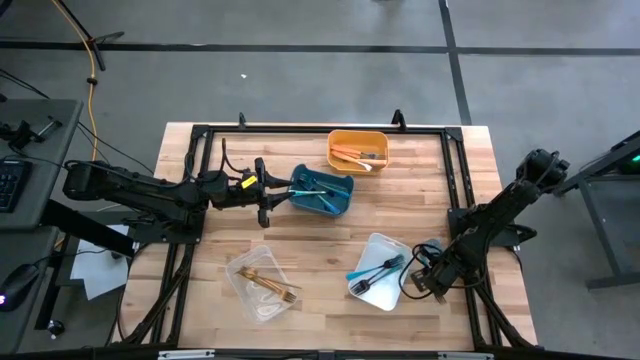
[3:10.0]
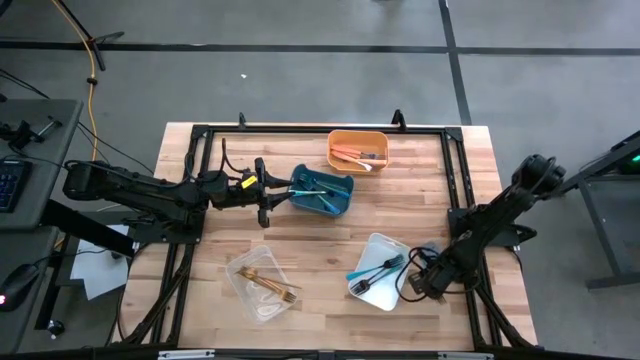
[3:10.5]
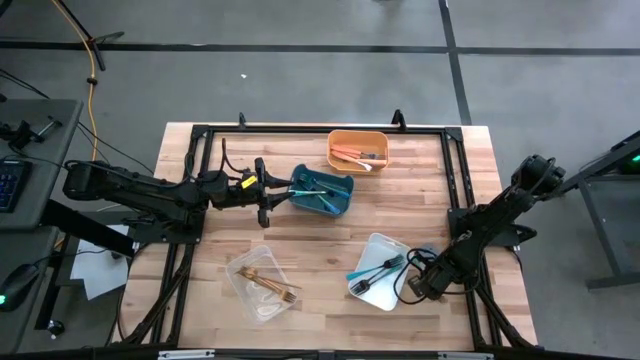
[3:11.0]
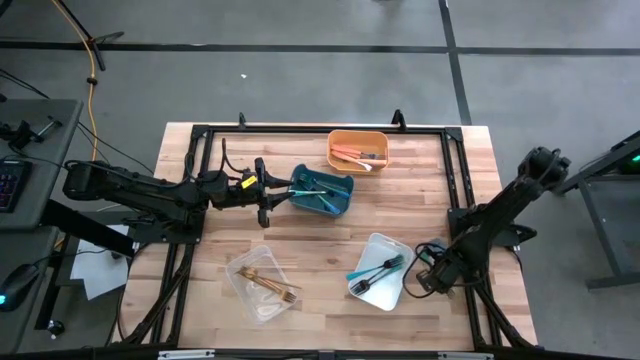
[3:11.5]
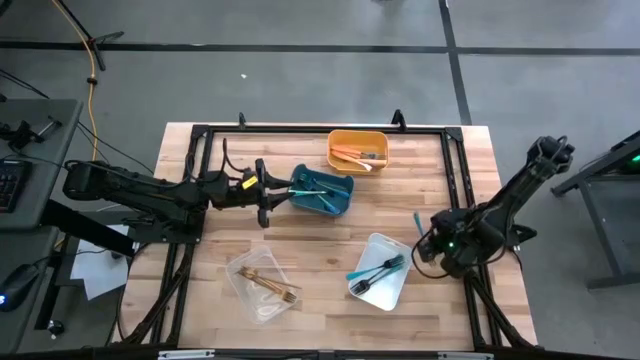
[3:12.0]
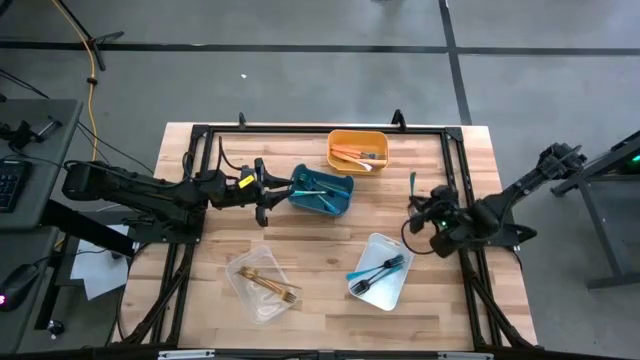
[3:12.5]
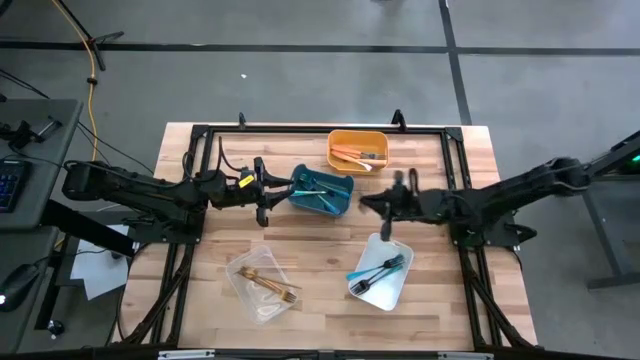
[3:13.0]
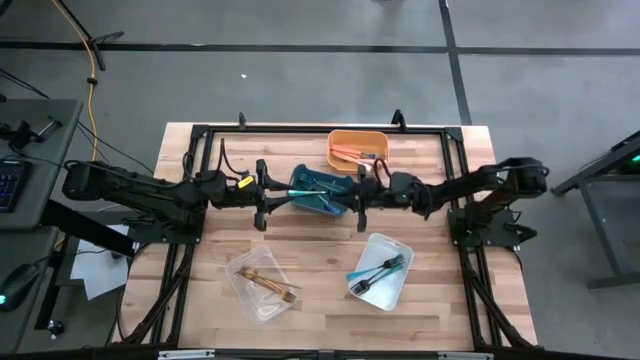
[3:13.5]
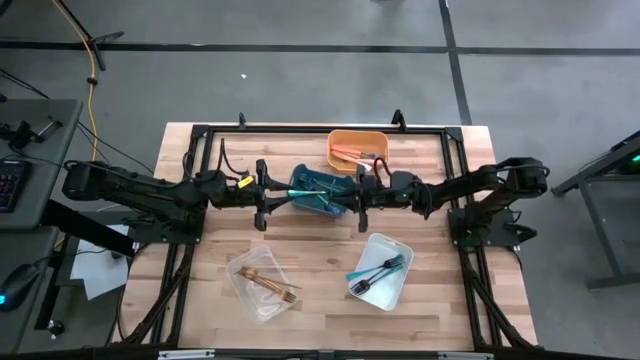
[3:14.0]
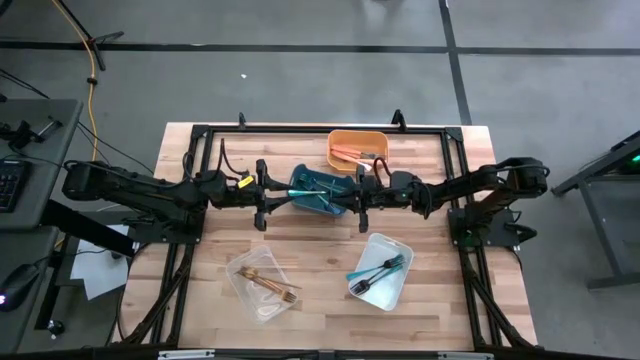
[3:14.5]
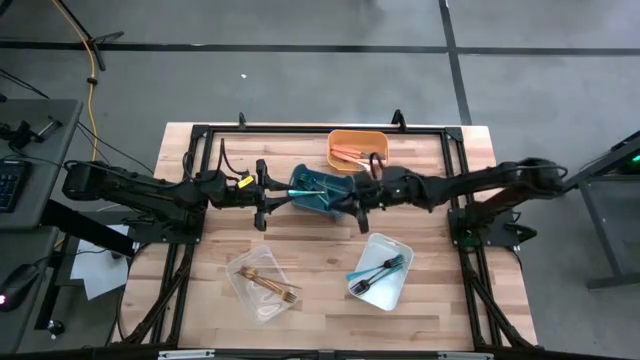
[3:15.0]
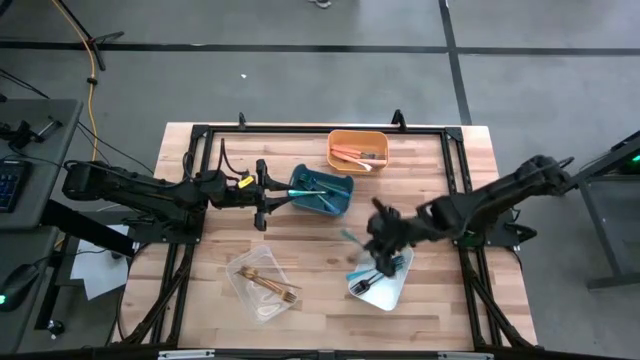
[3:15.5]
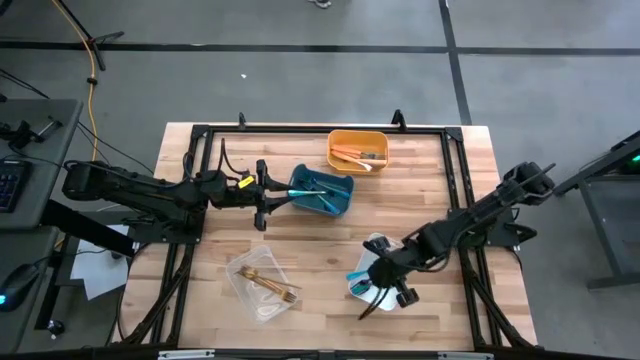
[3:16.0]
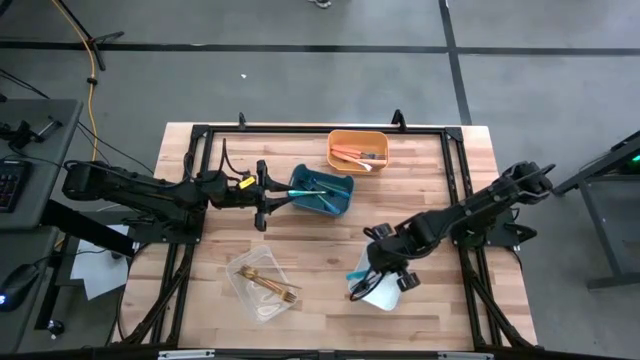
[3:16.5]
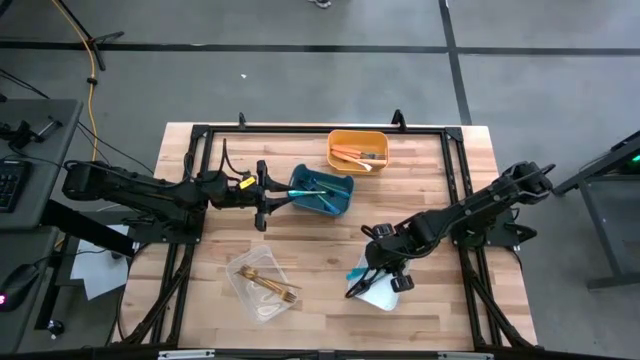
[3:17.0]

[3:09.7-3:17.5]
Task: Sort silverware by color (type)
Put the blue-black fork into the white bin

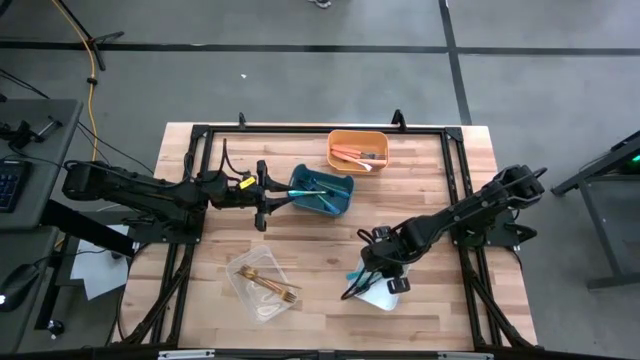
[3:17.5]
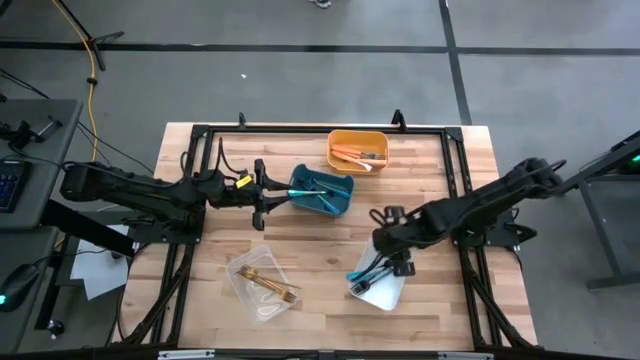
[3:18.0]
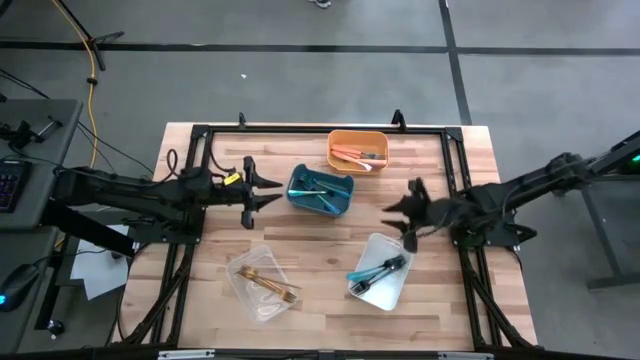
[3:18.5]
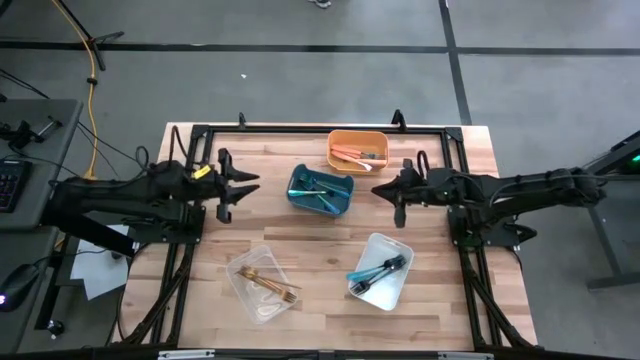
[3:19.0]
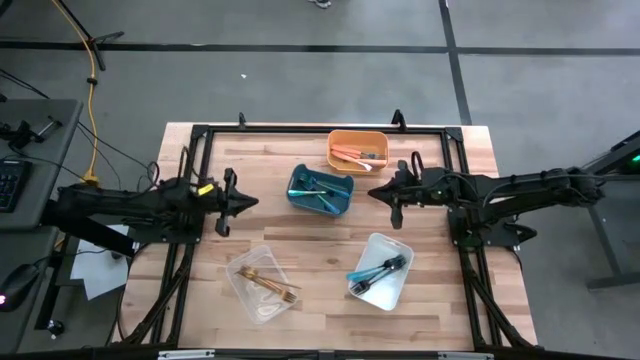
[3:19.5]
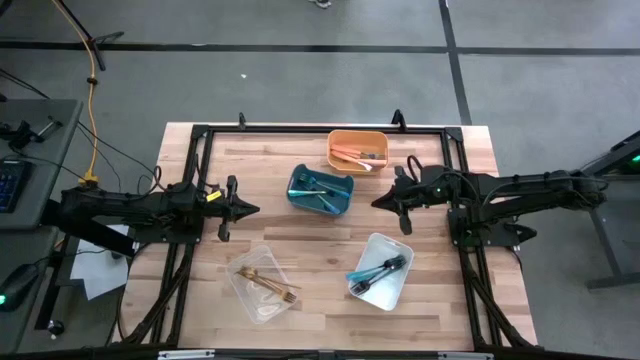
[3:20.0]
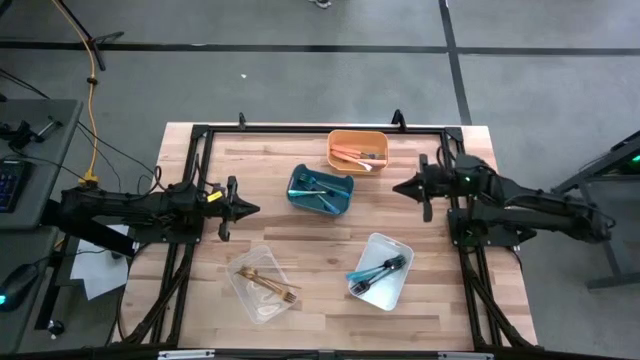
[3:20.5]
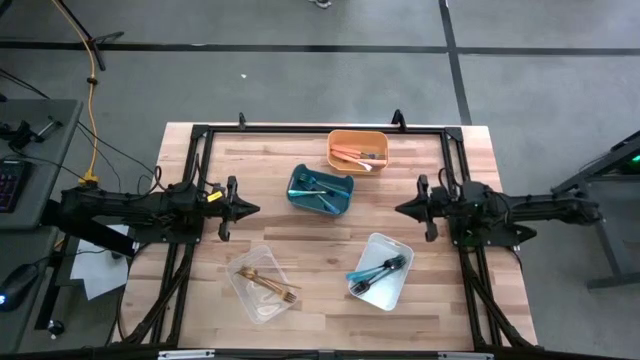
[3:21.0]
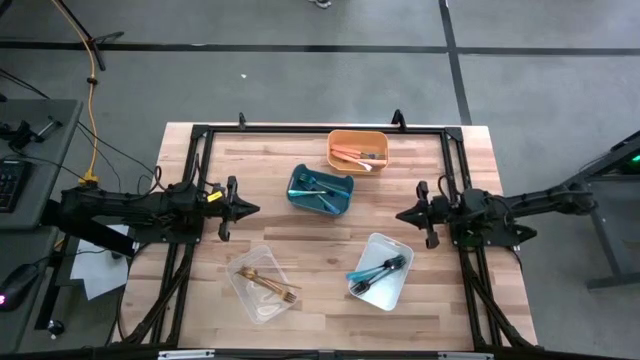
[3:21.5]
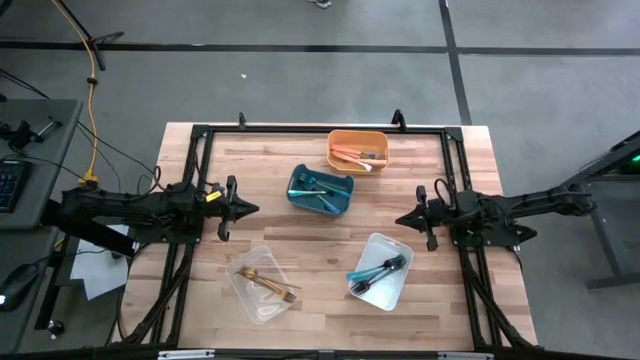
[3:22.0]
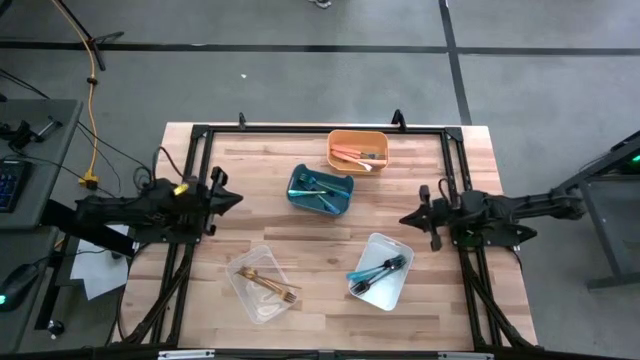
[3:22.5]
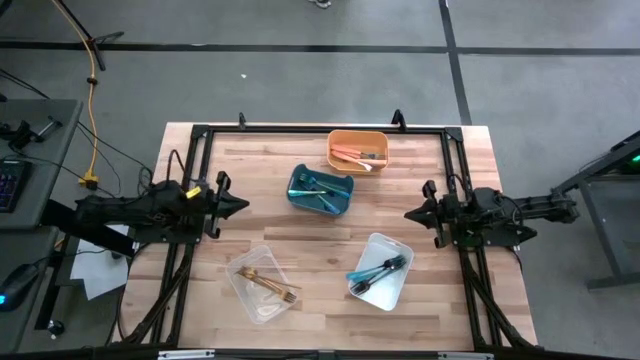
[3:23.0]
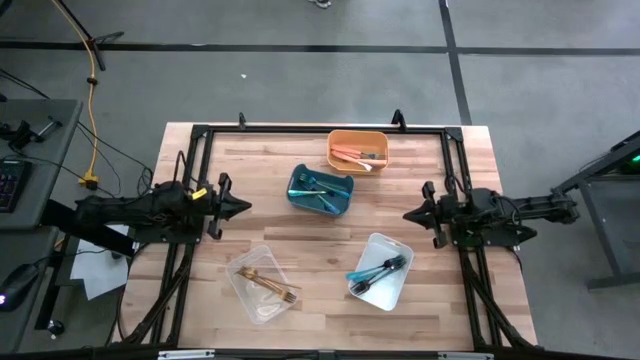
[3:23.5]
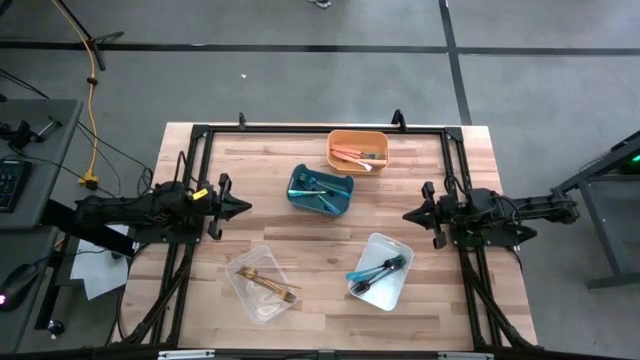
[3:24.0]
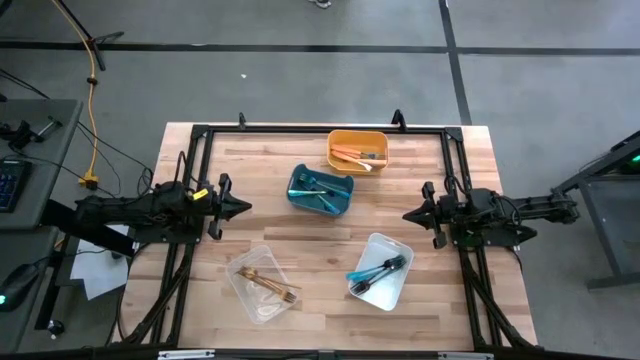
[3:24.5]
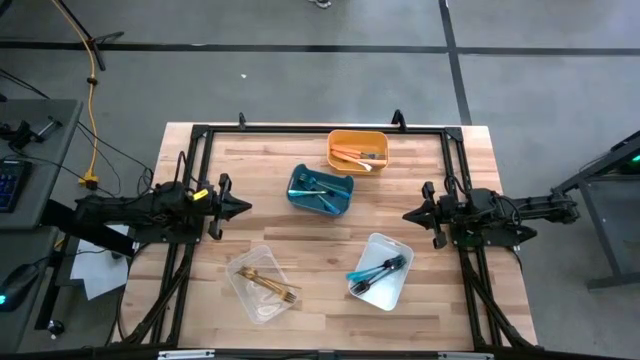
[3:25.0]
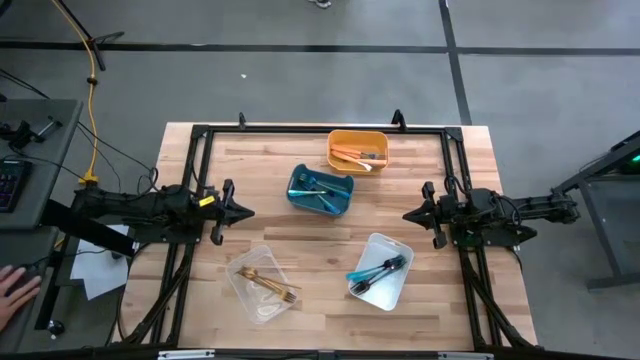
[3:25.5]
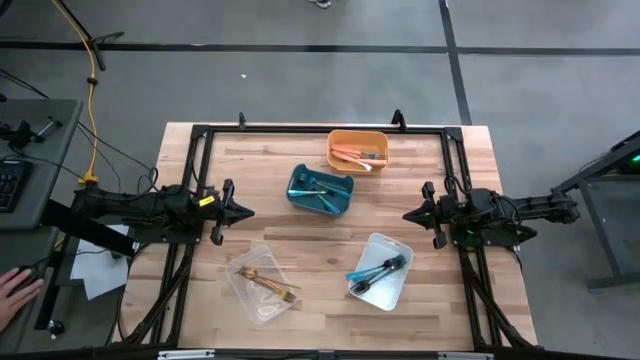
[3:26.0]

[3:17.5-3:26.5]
Return to Home Position

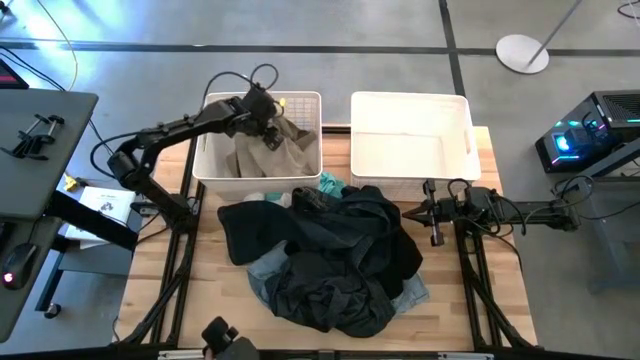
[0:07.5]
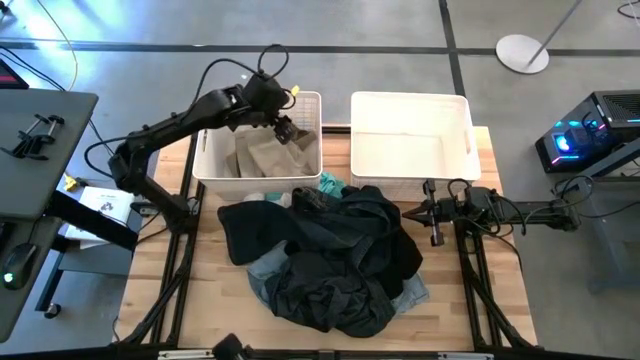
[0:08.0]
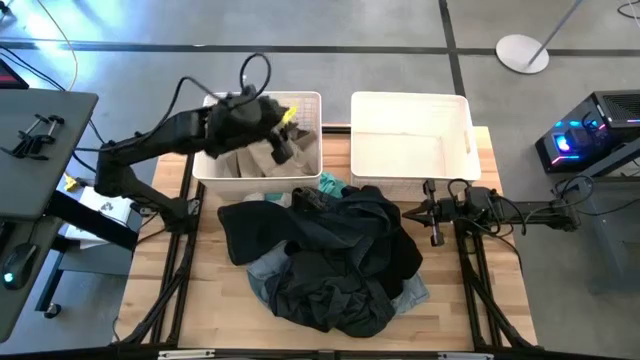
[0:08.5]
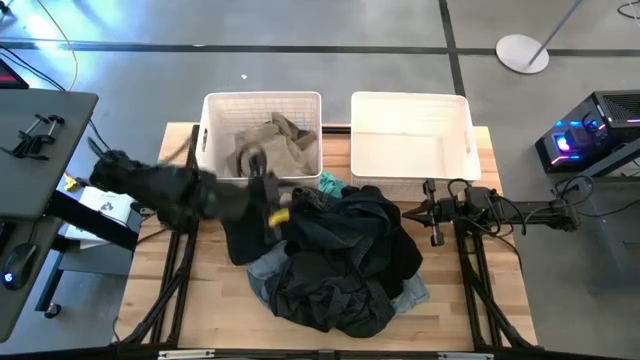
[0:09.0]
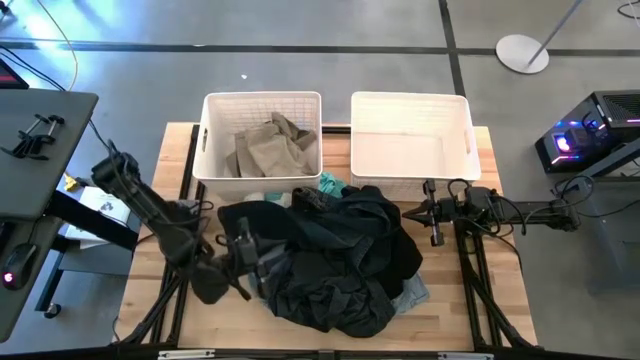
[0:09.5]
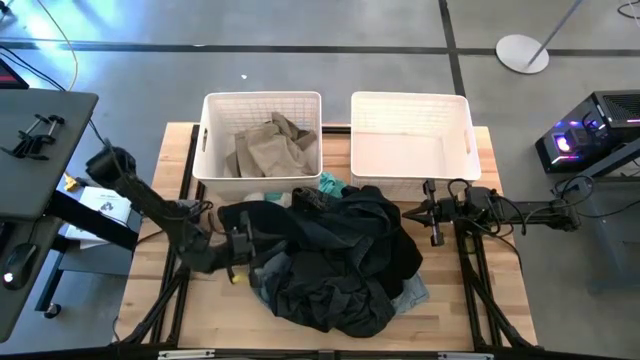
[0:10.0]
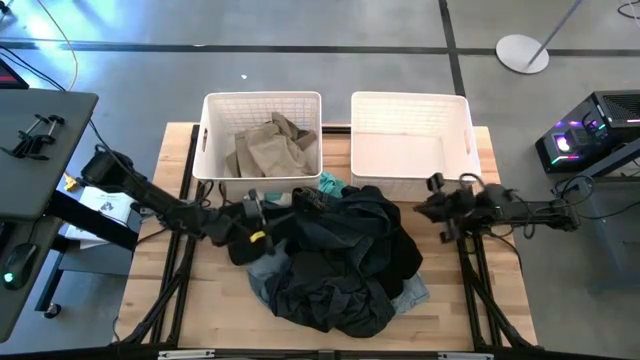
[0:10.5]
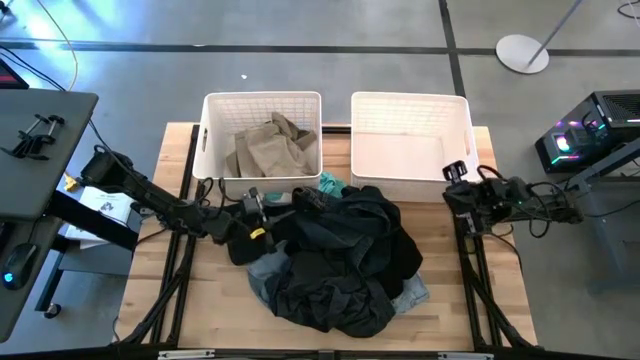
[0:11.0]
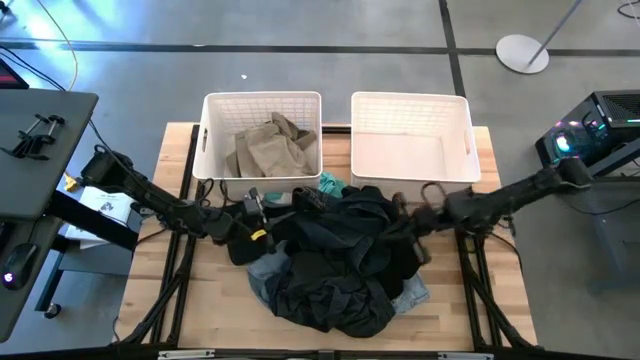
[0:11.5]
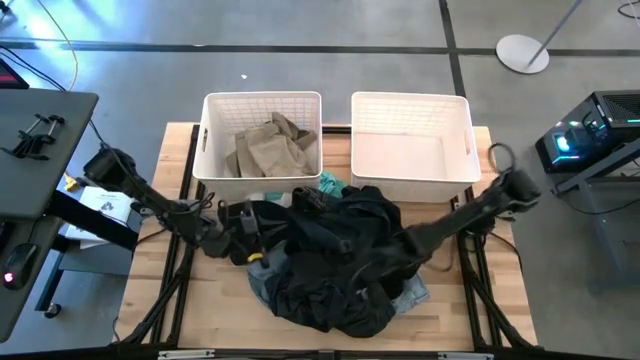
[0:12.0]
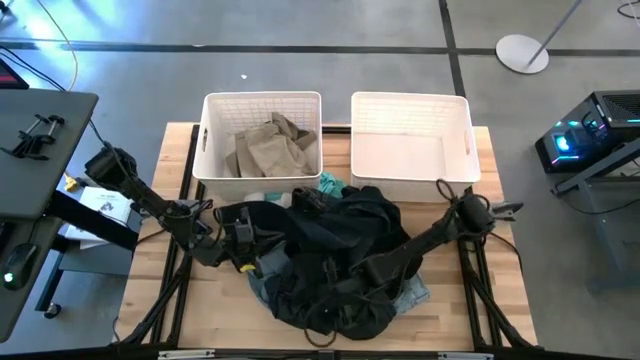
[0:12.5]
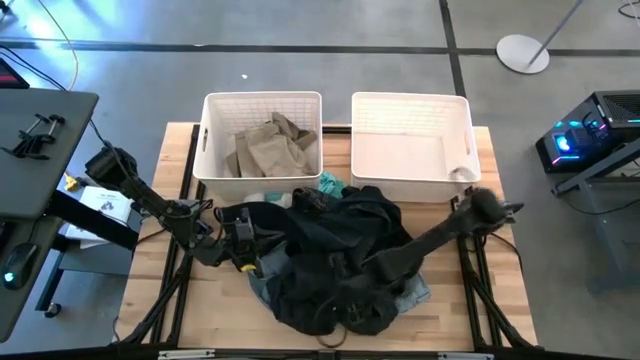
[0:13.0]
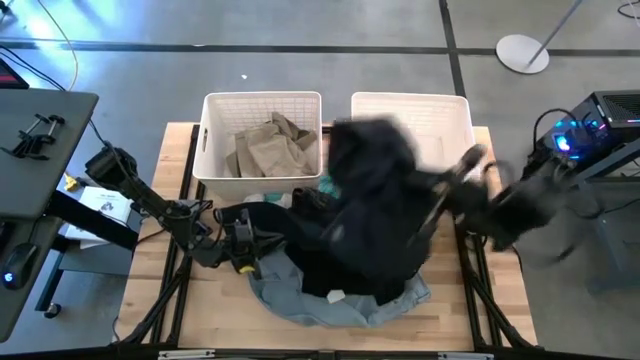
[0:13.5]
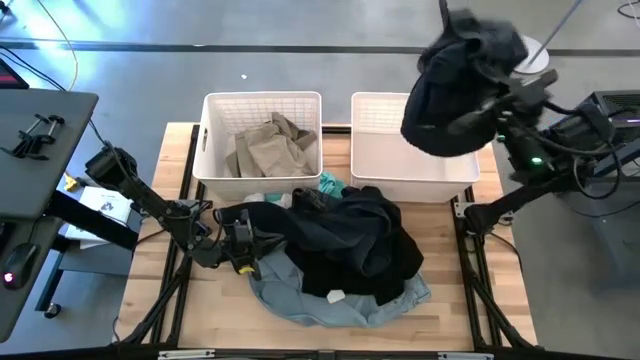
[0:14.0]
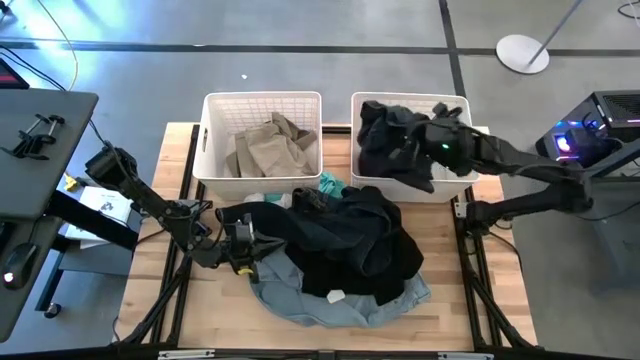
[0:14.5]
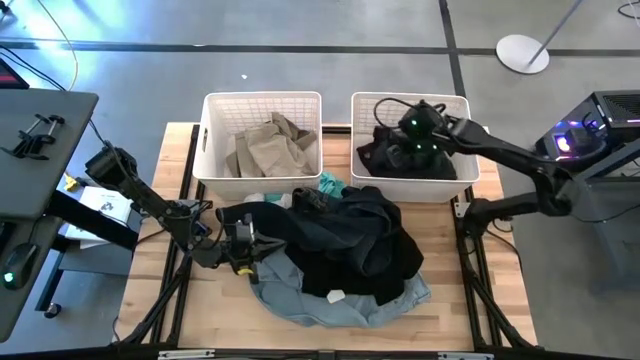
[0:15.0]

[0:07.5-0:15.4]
Task: Sort clothes
Put the black shorts into the right white laundry bin
